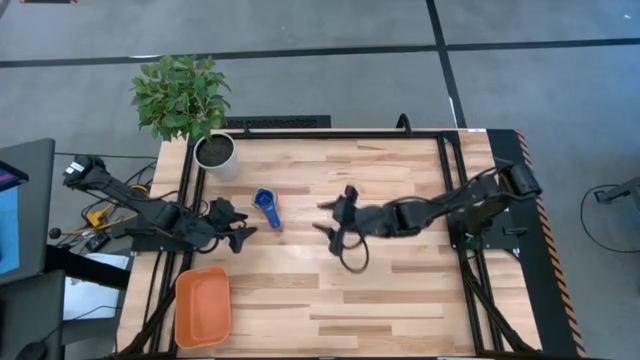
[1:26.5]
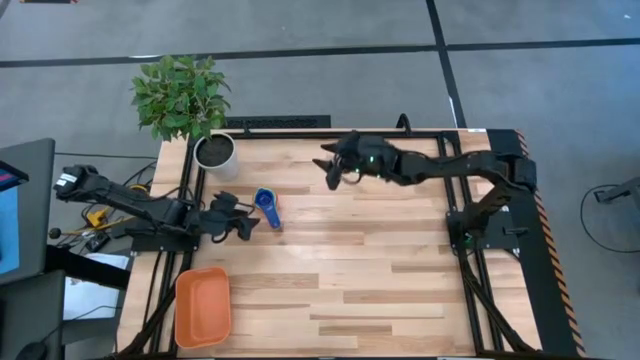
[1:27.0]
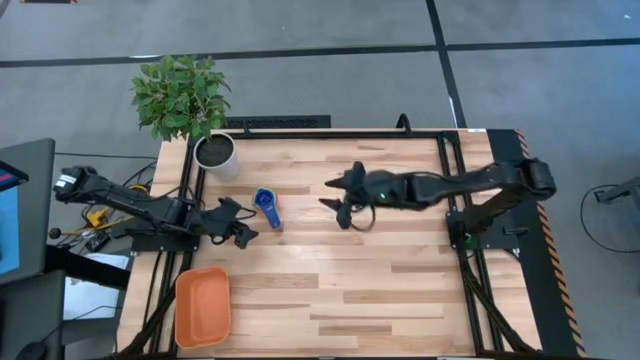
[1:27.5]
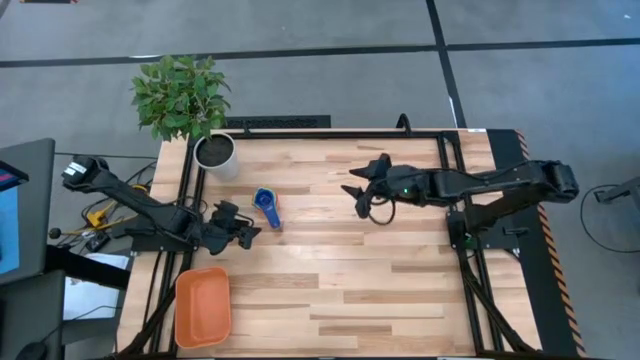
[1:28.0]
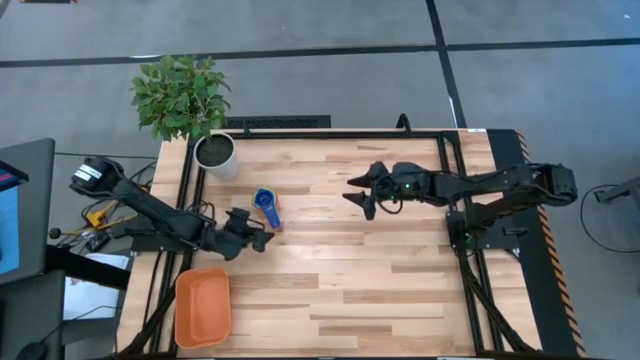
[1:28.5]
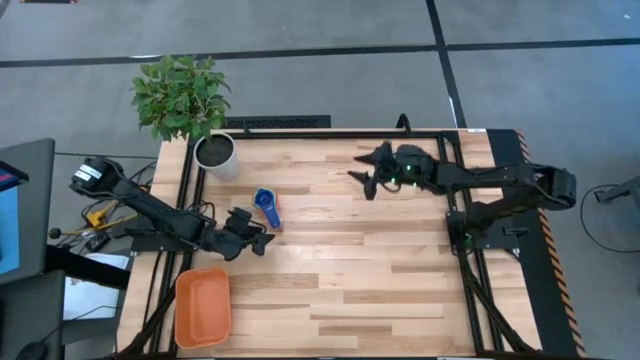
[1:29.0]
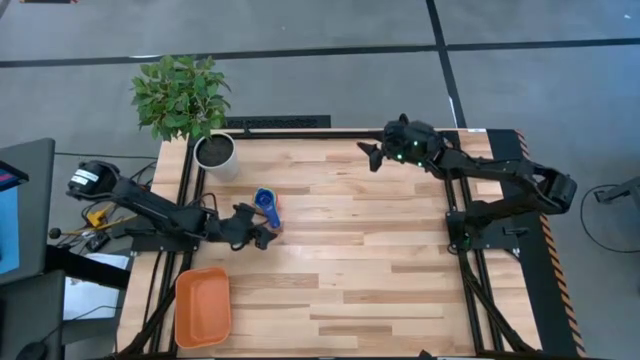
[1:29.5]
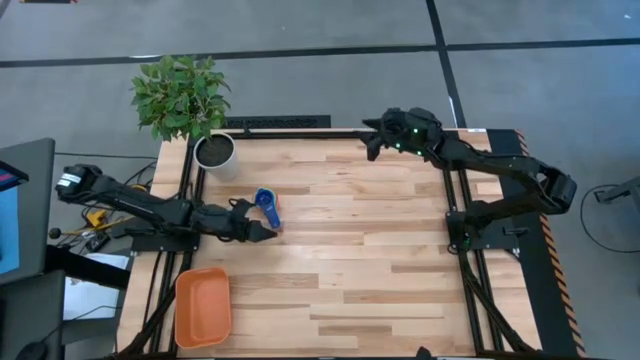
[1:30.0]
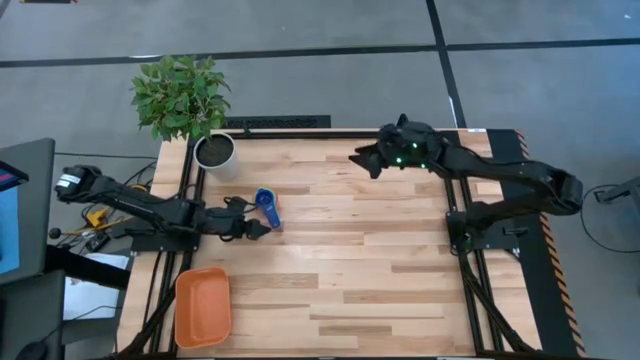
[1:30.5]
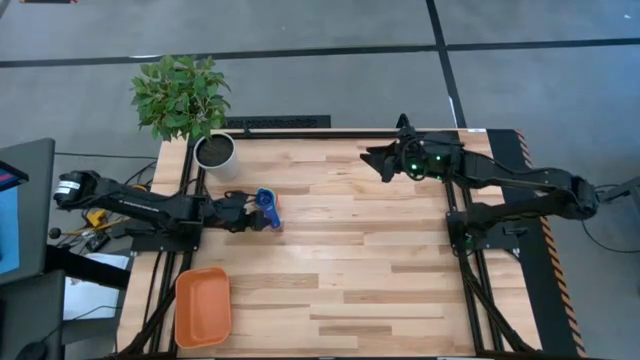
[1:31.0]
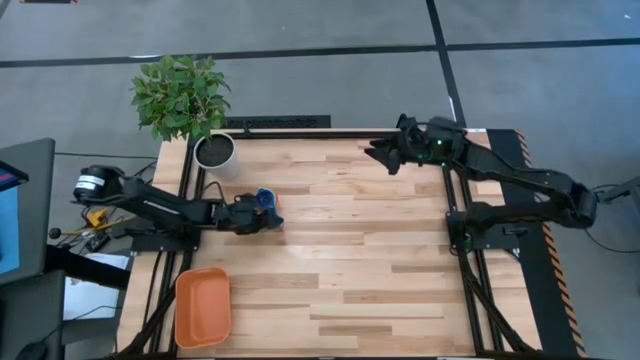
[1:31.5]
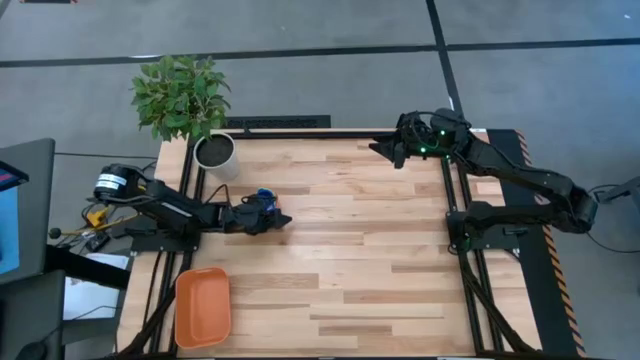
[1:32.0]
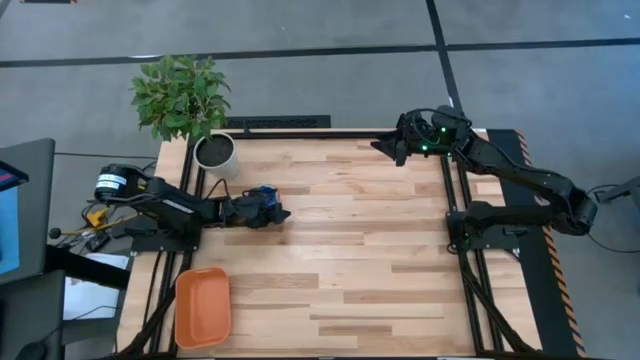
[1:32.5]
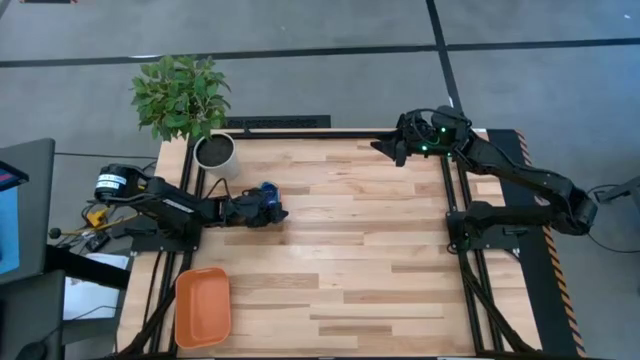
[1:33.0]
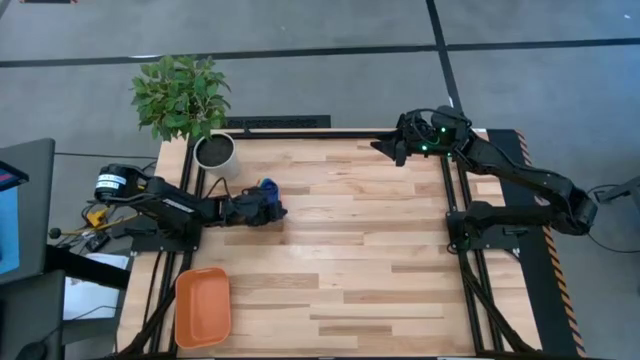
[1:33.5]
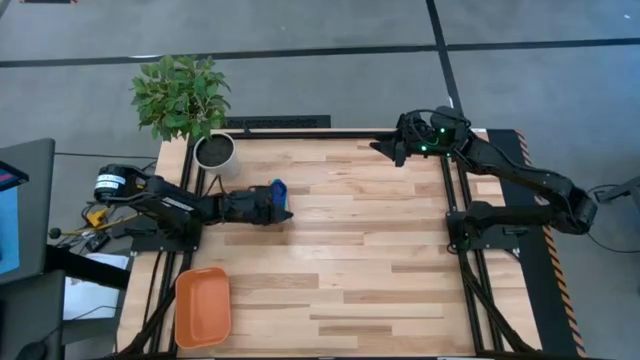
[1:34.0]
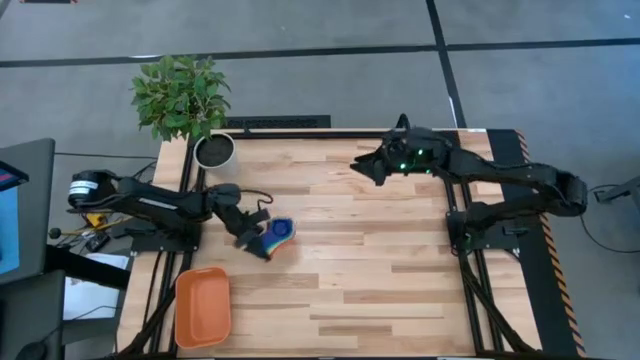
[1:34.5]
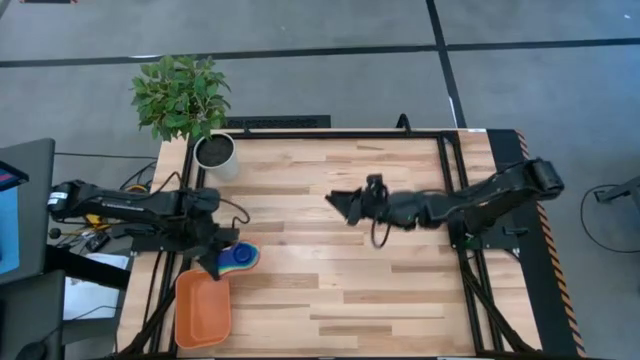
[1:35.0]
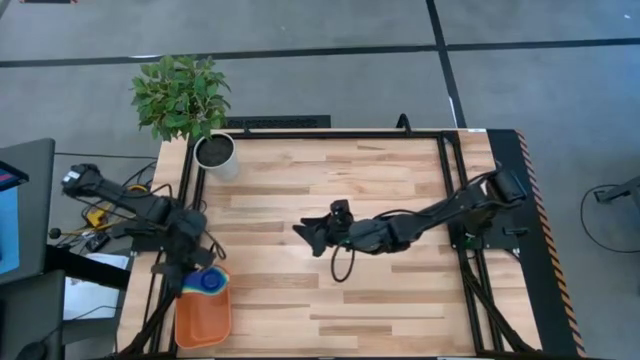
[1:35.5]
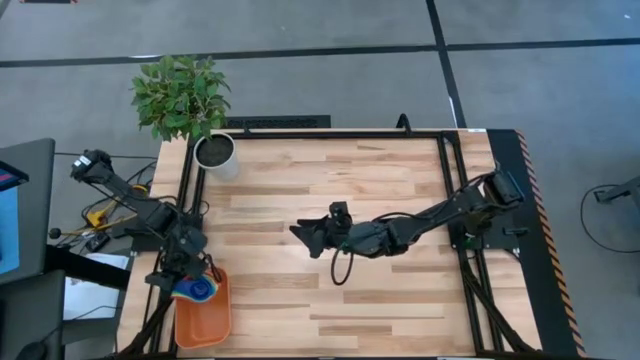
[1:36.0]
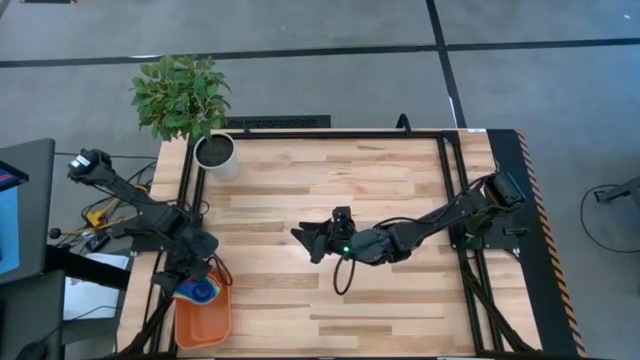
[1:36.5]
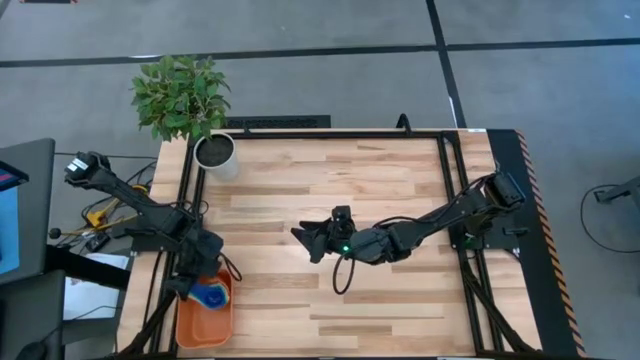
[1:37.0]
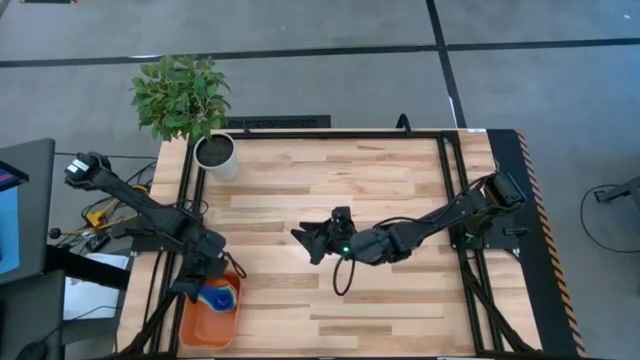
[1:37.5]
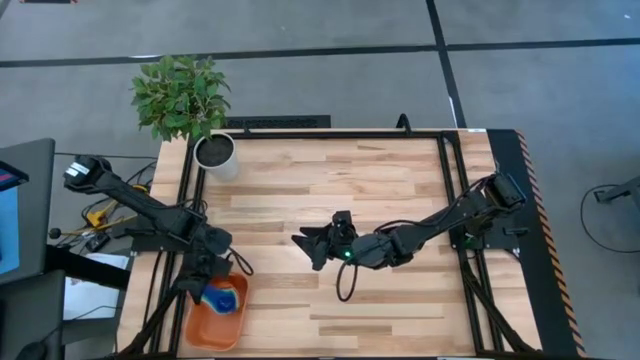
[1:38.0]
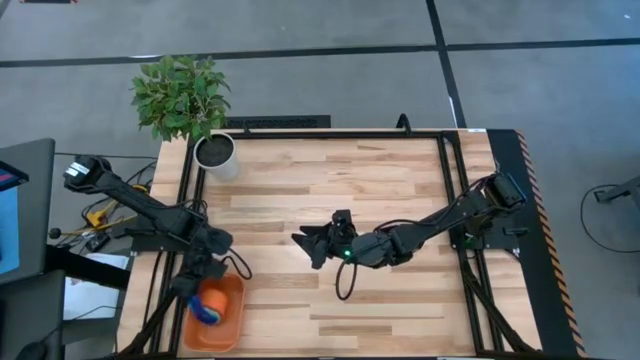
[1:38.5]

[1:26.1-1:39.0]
Task: Nest measuring cups in basket
Put the nested measuring cups into the orange bin

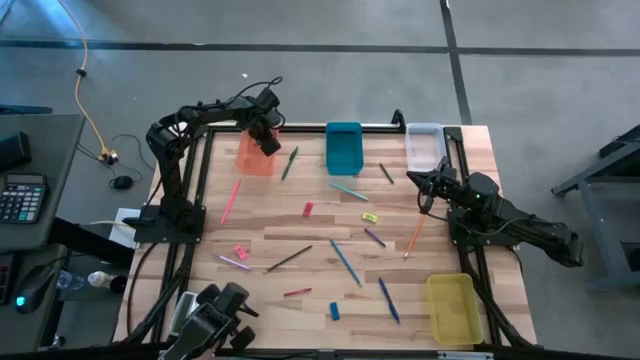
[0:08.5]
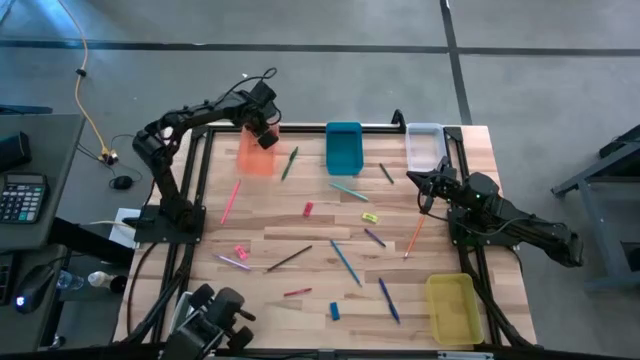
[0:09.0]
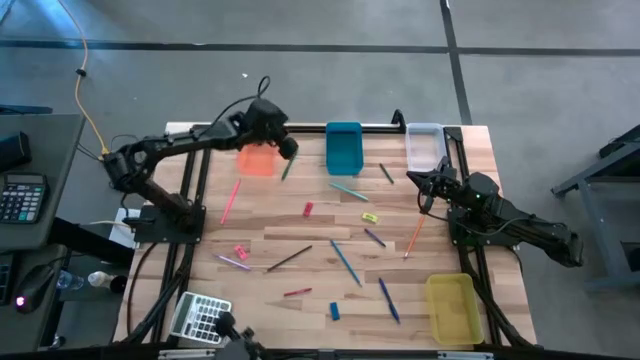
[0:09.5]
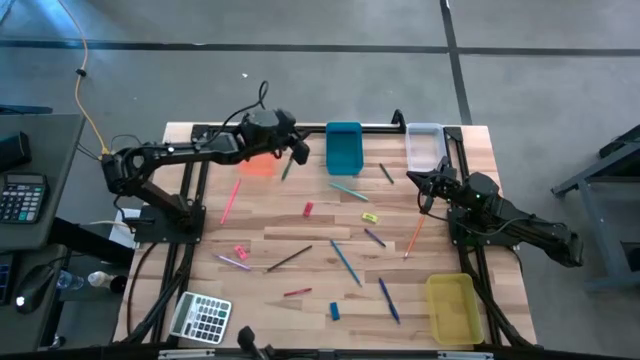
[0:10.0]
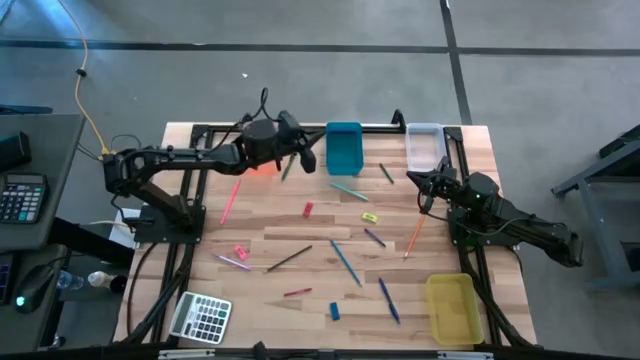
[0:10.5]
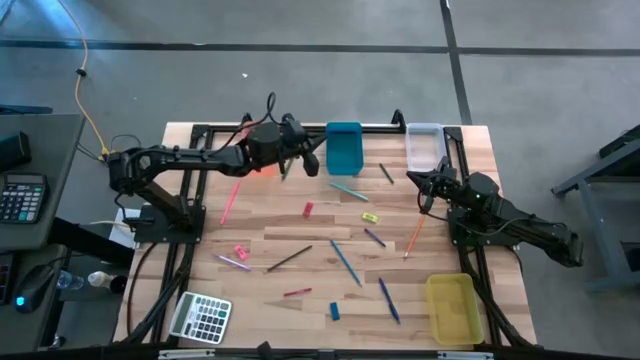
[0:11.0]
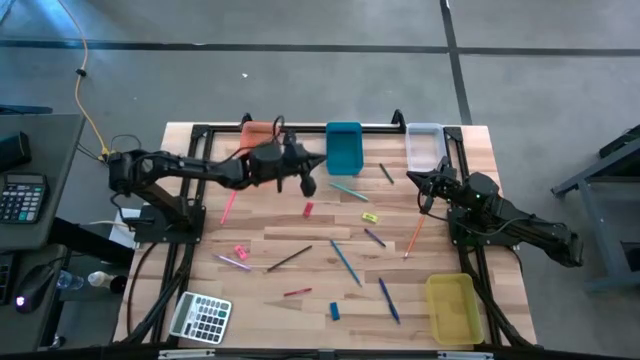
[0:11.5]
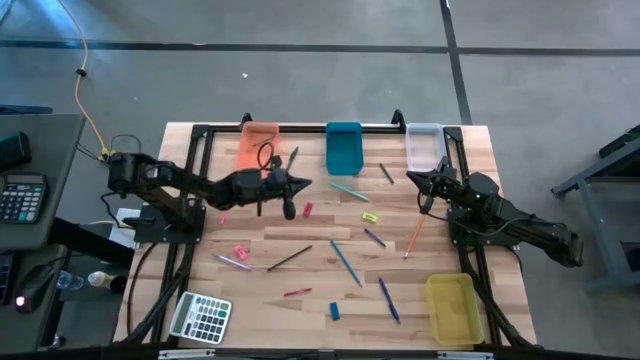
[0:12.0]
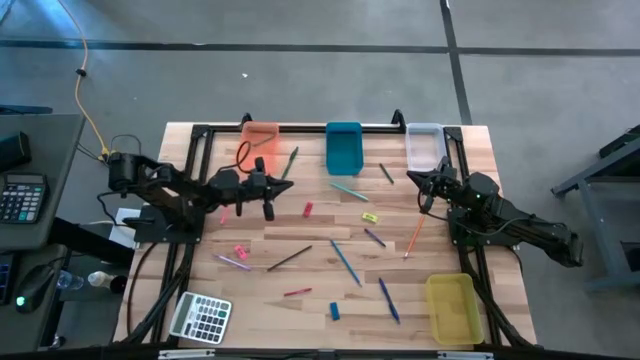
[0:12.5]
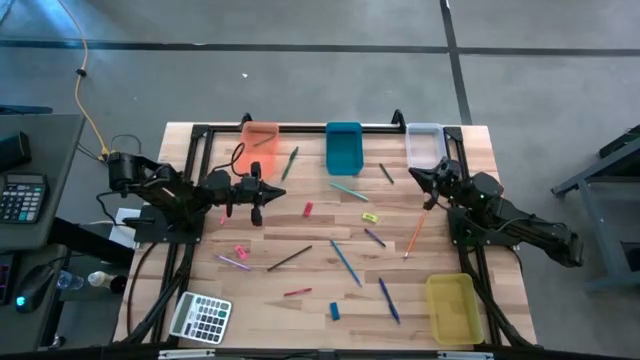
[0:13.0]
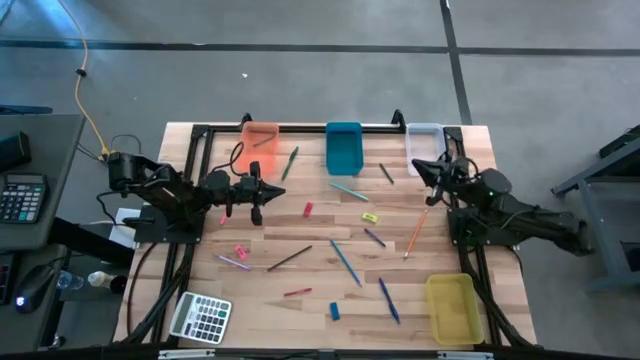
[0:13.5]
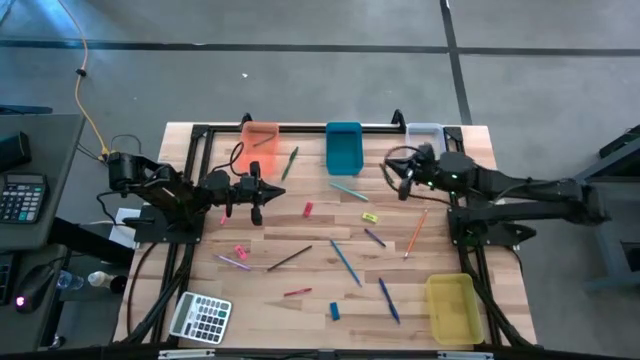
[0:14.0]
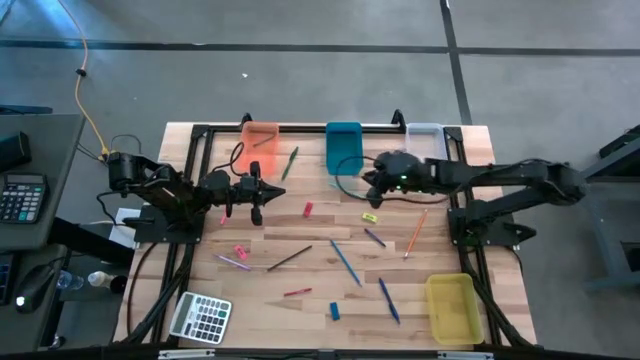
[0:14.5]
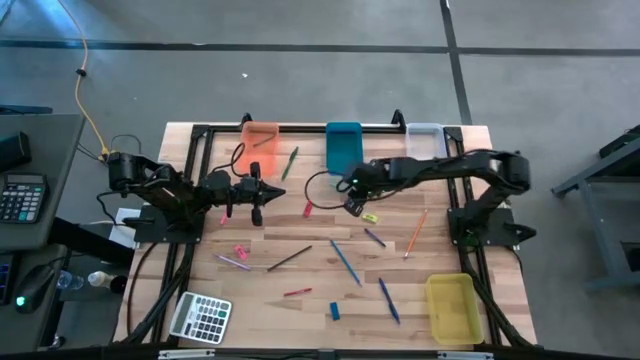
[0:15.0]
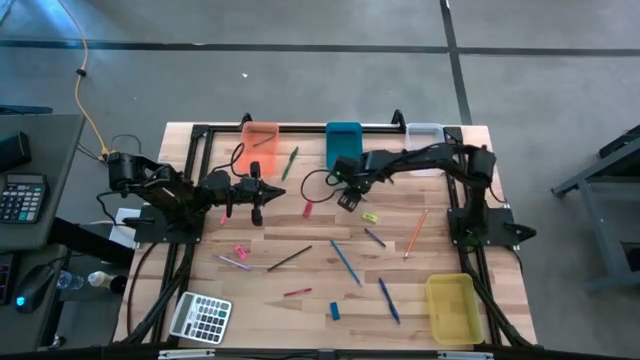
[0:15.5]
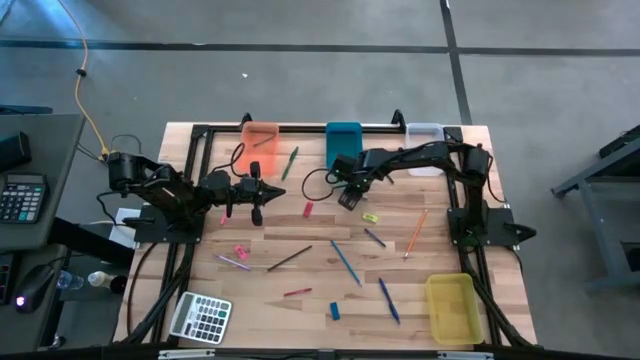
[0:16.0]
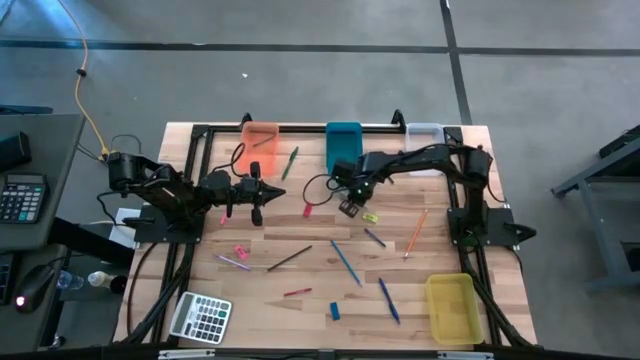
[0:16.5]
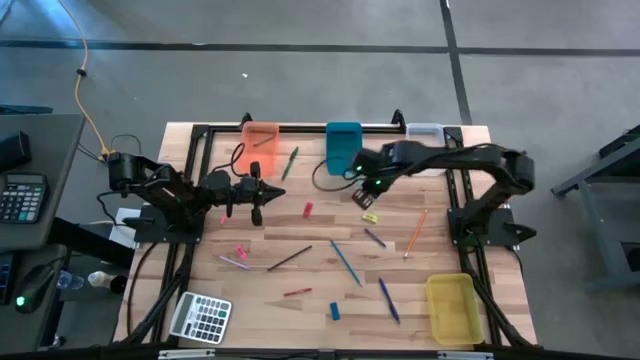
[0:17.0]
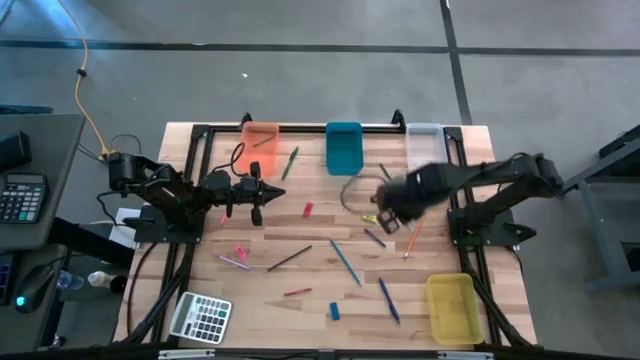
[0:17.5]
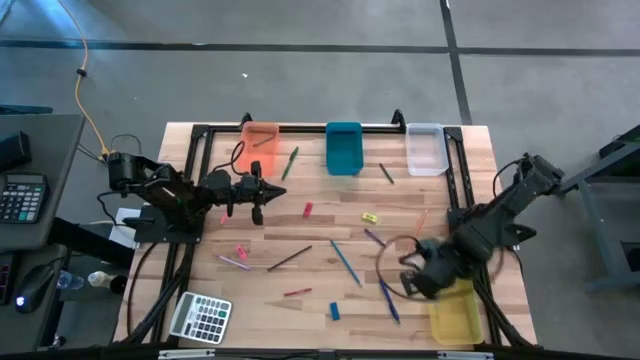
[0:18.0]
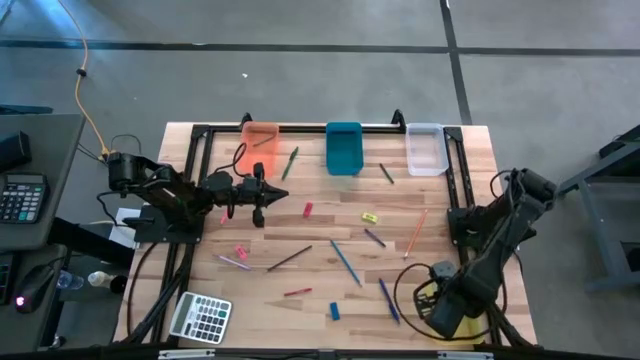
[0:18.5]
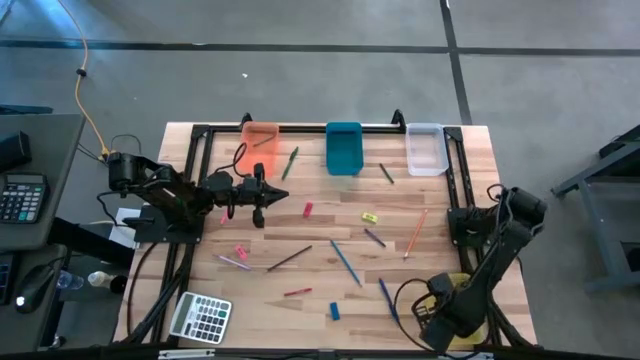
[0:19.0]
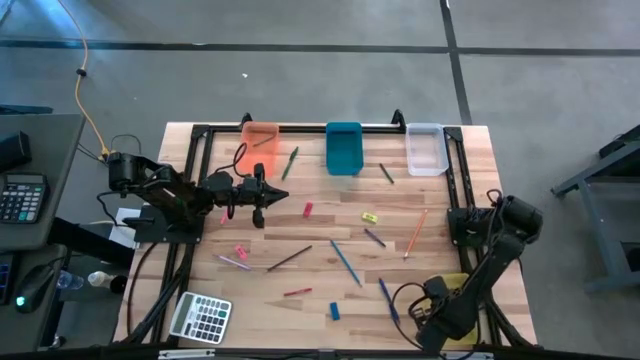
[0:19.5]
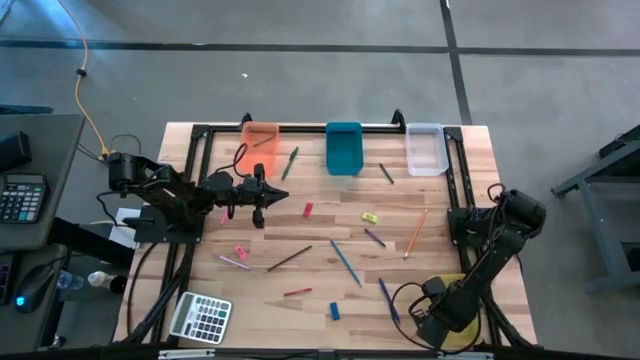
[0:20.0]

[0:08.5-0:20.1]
Task: Sort crayons/erasers/pens/pencils in bins
Put the light blue pen into the yellow bin
